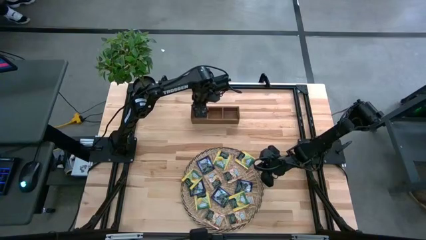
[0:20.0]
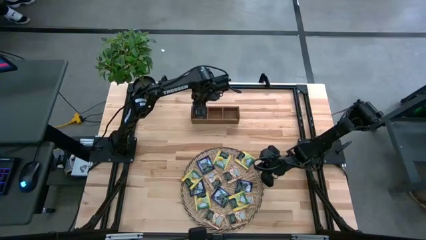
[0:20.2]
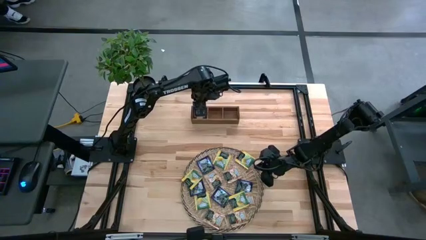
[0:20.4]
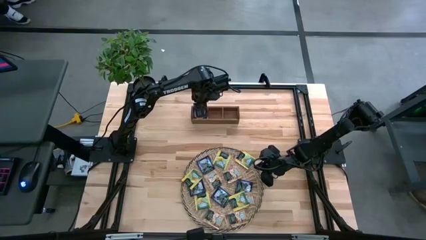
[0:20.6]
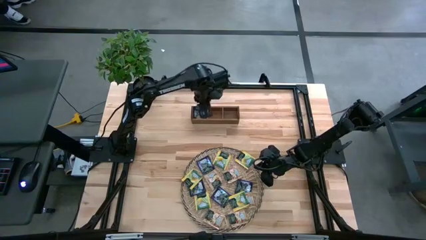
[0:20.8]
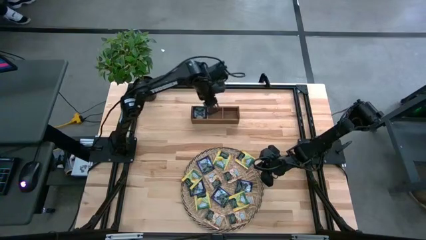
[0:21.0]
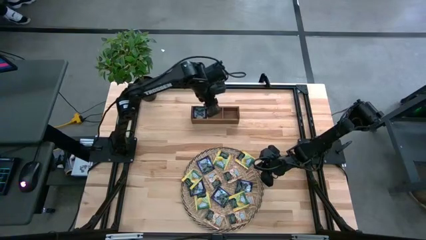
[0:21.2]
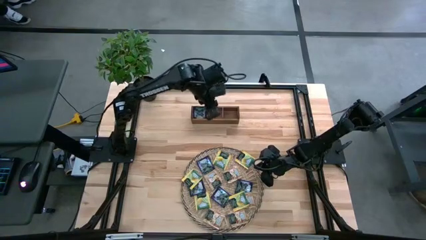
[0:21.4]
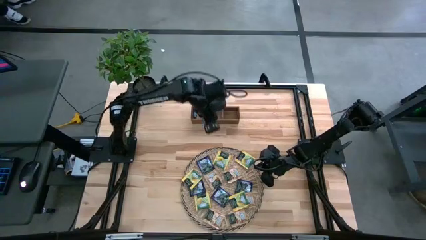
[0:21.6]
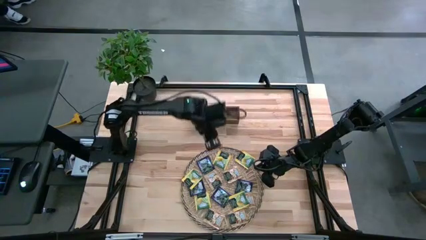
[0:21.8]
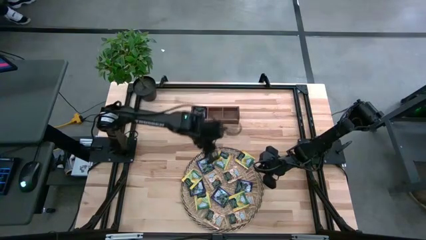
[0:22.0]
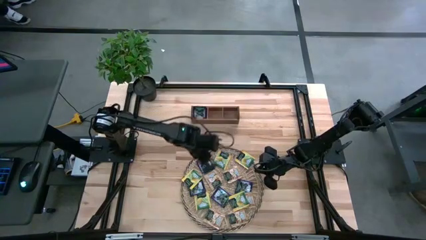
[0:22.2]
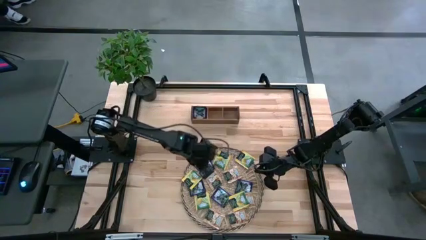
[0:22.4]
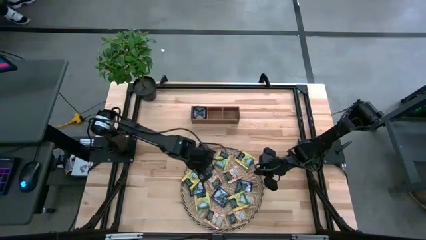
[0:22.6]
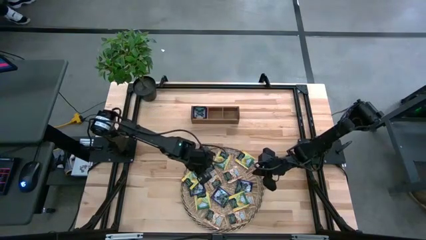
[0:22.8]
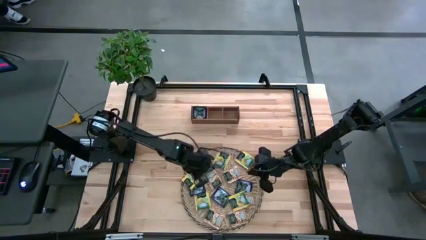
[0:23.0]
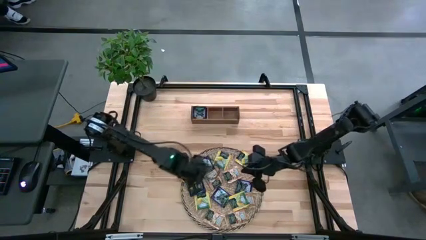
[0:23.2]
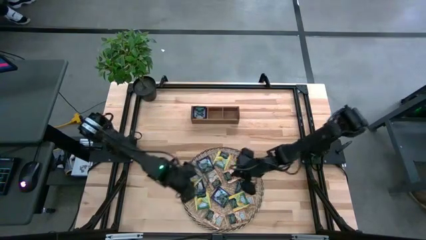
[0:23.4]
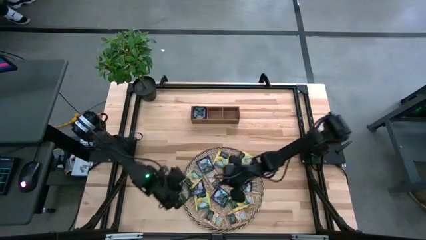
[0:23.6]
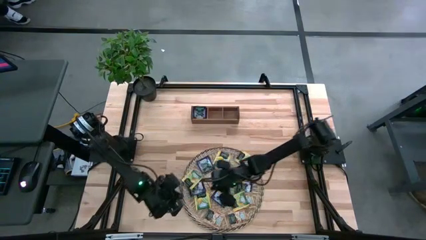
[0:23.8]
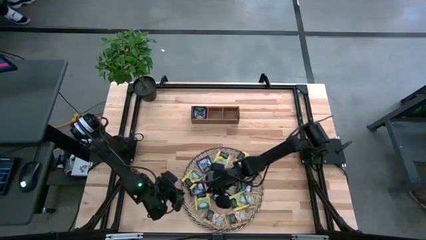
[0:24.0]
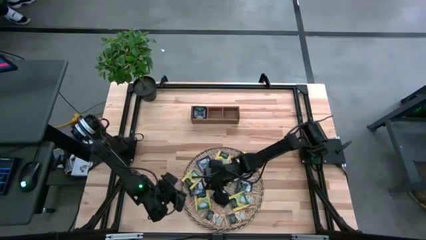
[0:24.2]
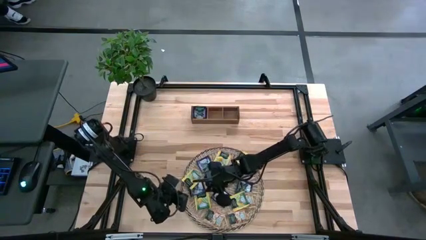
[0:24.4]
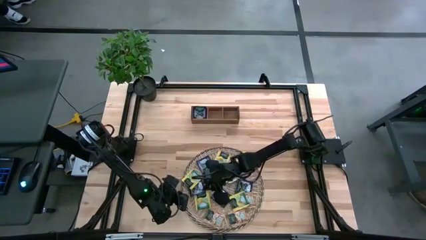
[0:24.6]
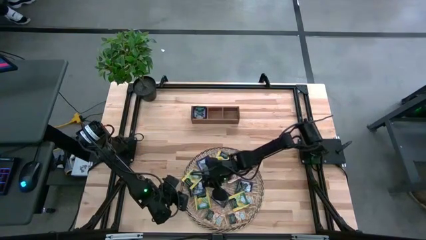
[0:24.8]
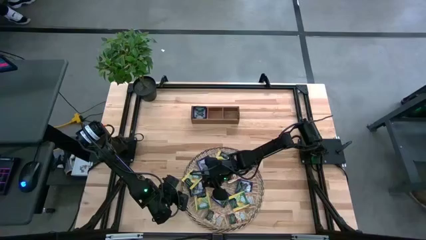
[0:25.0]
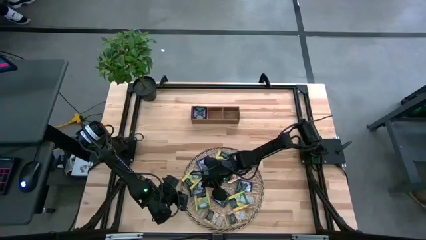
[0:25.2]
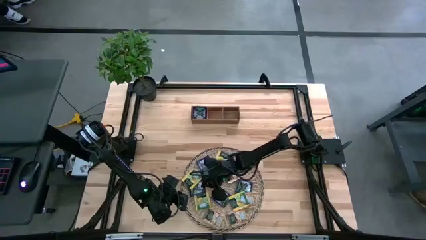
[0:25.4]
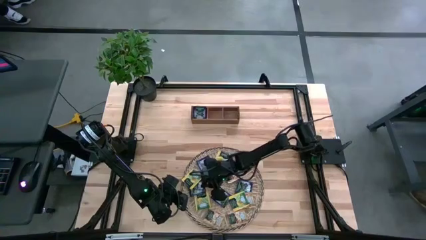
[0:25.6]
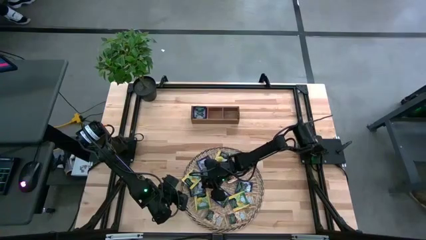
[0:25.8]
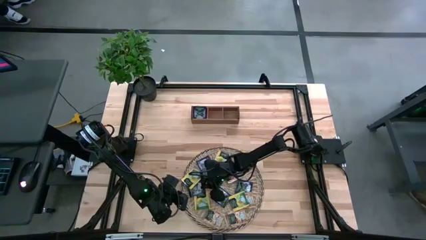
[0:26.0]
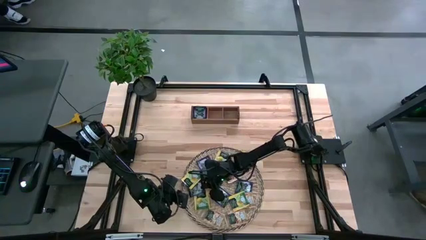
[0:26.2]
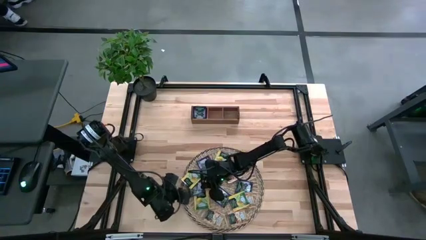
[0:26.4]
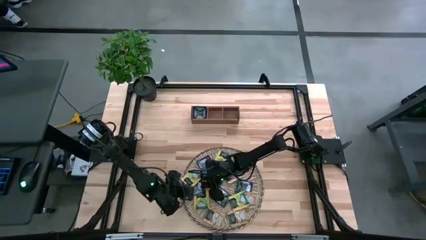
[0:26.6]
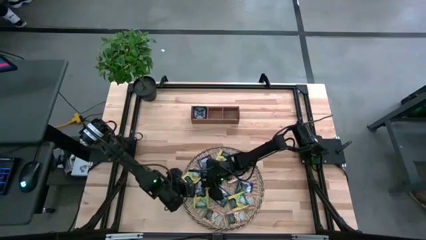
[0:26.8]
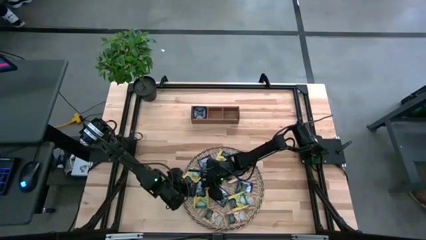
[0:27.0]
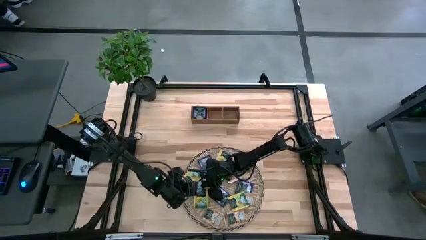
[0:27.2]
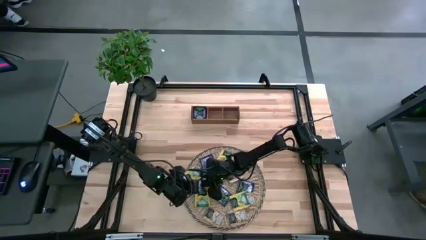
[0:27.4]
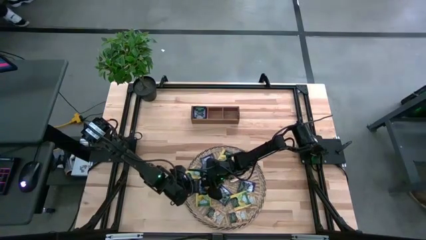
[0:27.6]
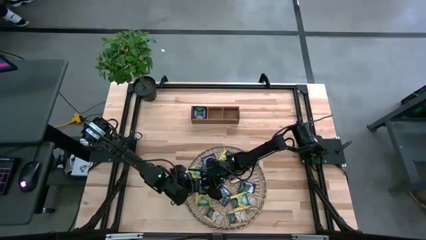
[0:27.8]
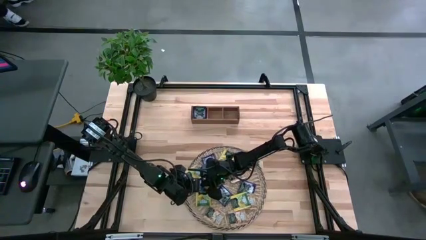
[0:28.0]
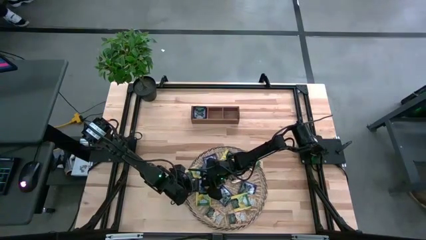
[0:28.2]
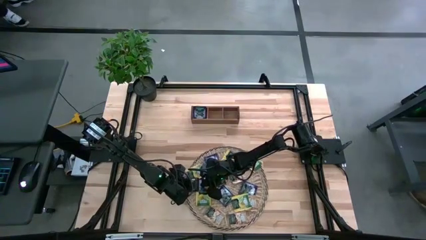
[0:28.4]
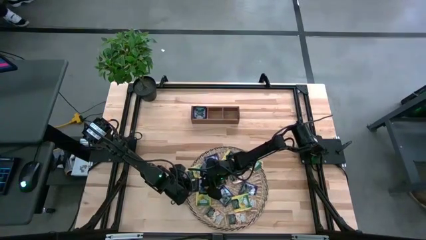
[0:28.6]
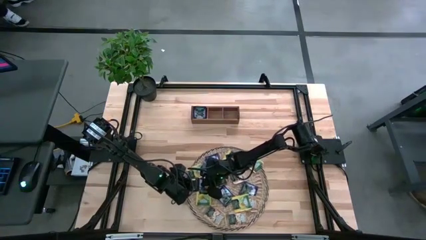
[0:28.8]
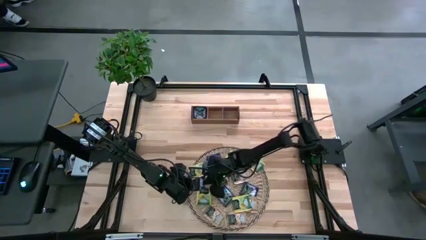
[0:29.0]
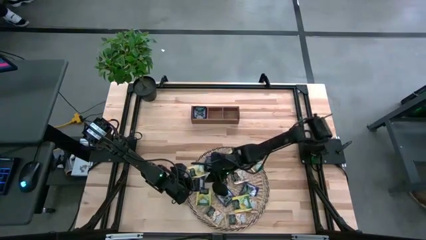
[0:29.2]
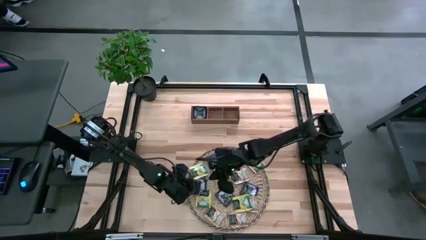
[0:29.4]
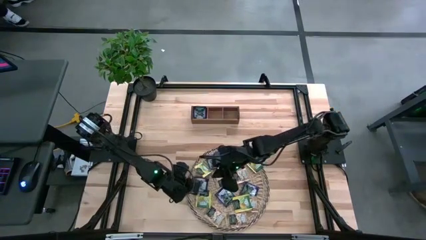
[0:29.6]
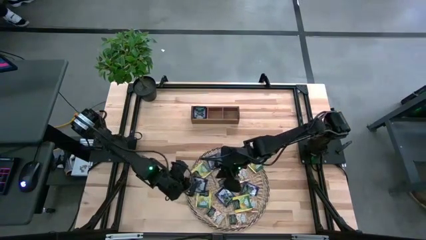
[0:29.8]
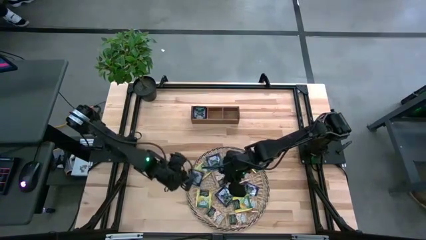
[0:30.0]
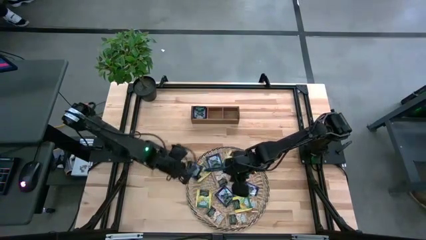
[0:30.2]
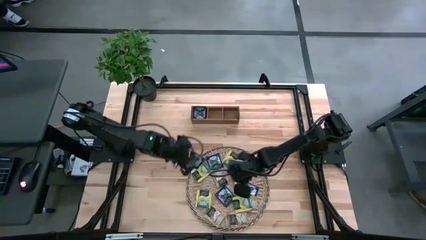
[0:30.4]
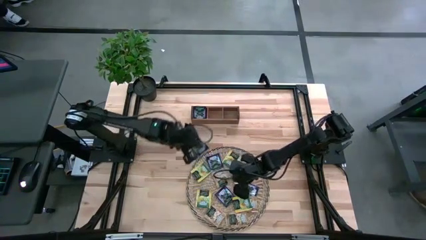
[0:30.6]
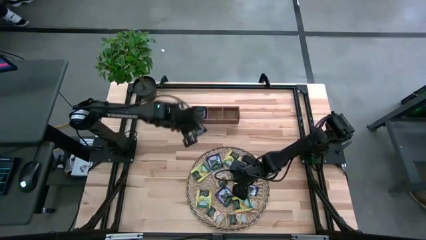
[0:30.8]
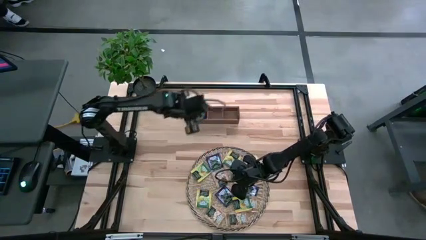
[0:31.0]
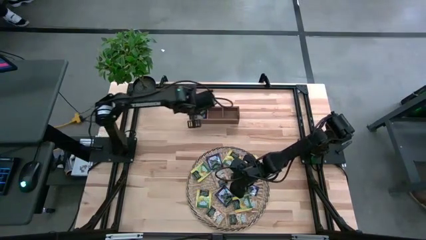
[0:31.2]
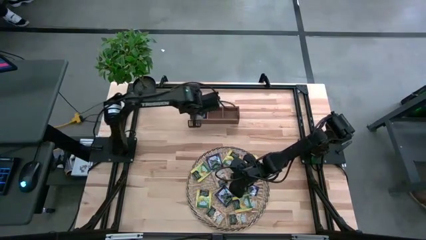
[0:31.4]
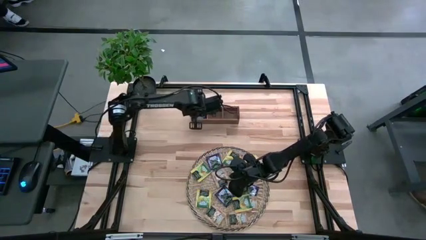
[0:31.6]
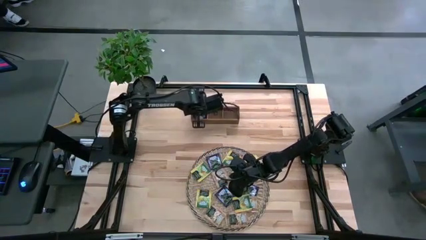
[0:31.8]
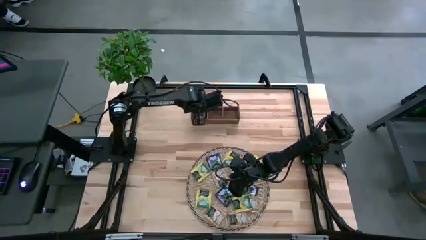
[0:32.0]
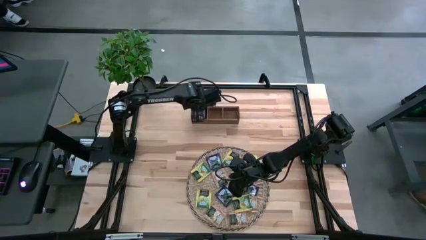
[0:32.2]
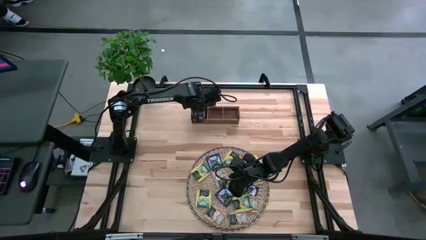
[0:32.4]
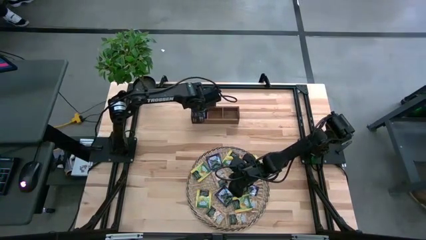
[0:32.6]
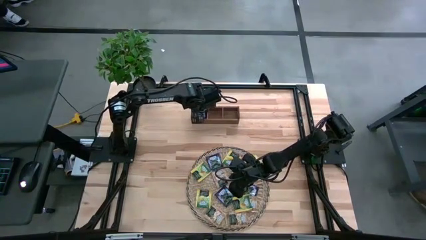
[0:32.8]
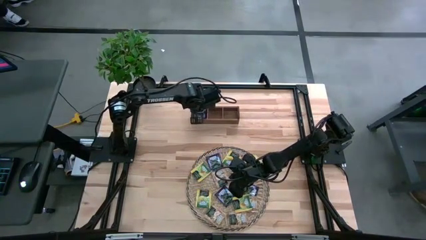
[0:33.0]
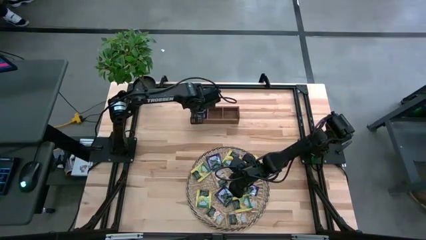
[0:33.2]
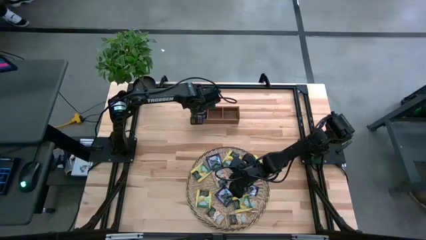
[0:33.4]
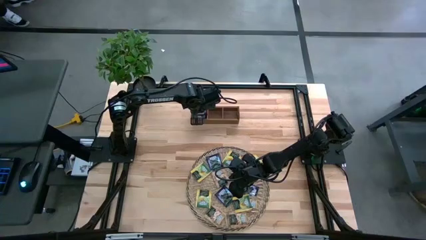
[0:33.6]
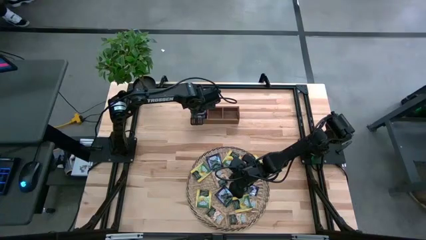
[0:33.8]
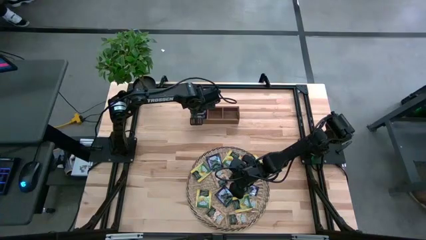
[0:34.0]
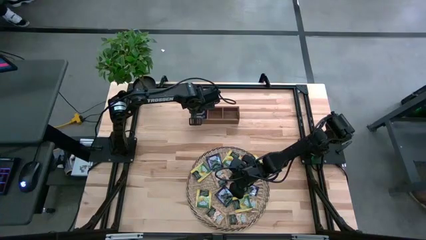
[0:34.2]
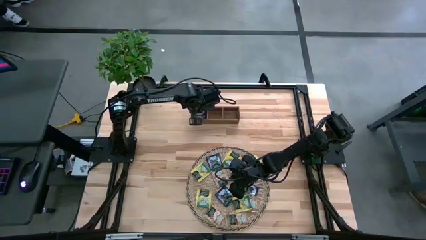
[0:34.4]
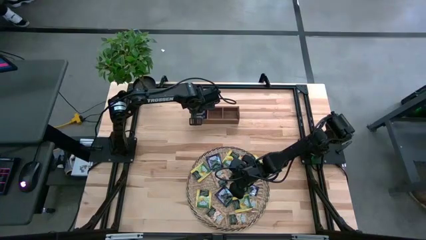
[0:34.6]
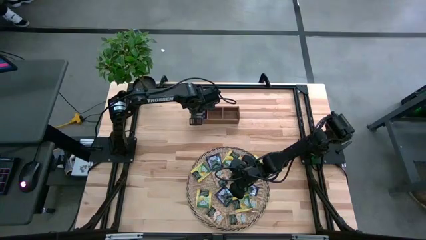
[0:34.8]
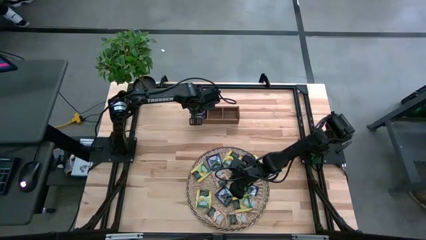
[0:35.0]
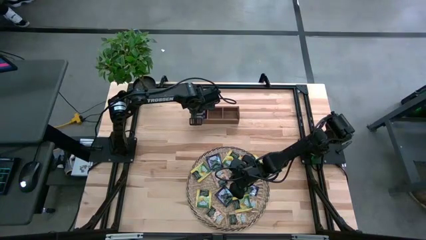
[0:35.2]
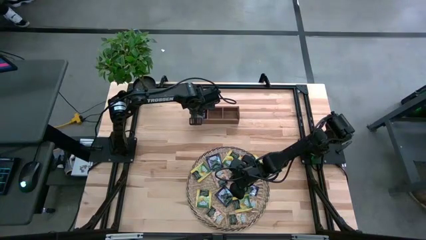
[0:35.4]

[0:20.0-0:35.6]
Task: Pick & Place Tea
Put the purple tea bag in the left section of the wooden organizer
